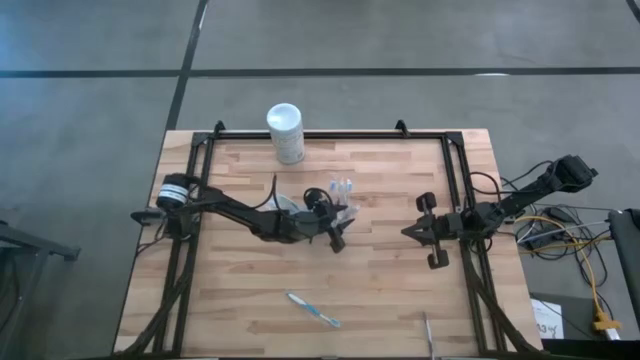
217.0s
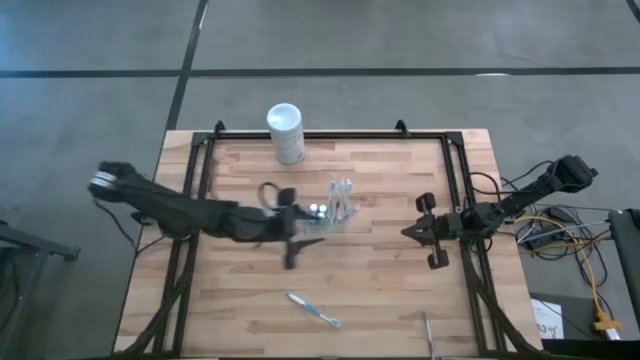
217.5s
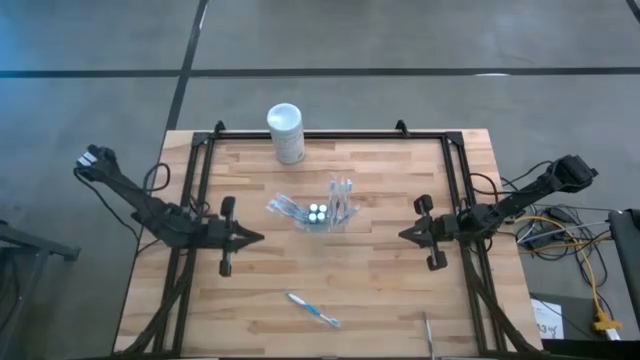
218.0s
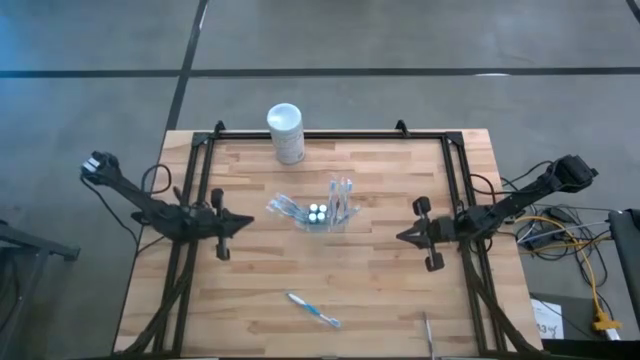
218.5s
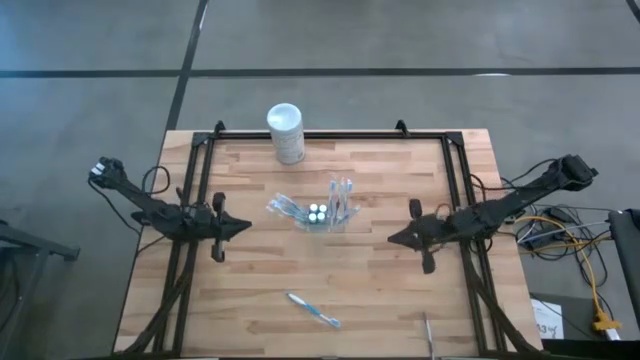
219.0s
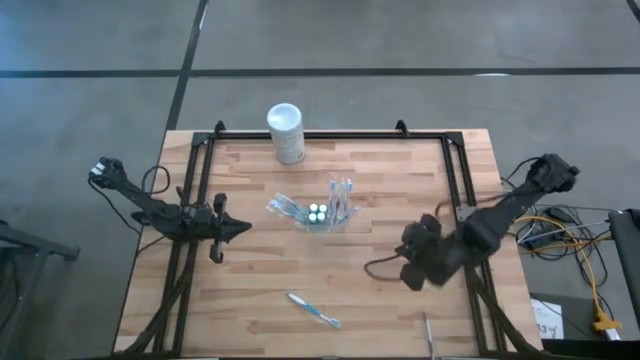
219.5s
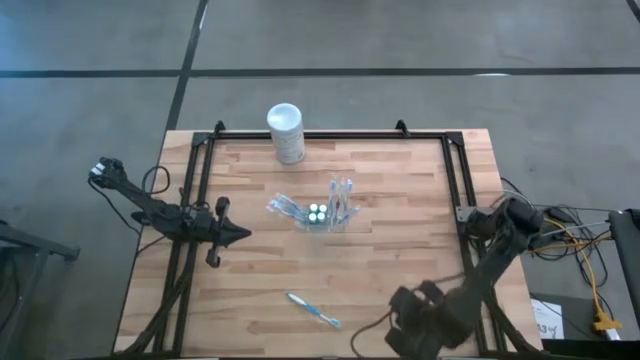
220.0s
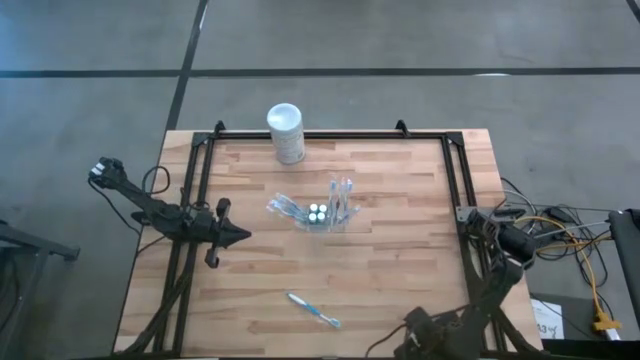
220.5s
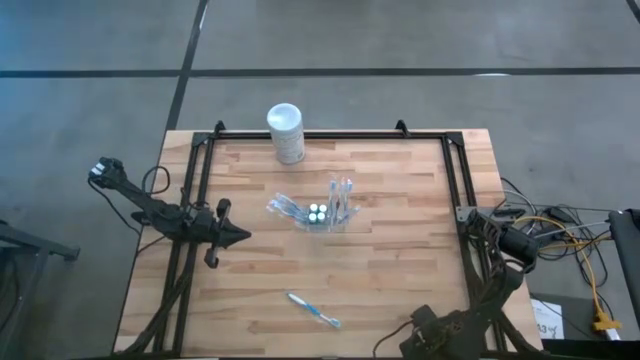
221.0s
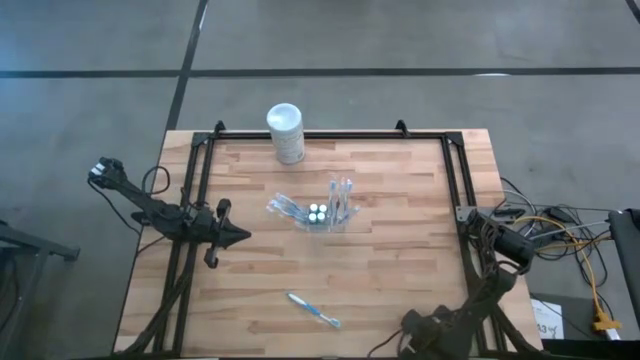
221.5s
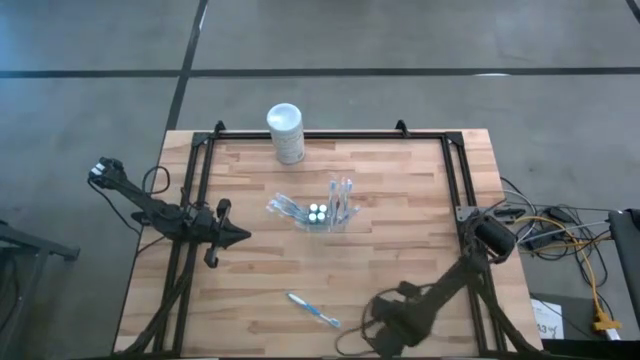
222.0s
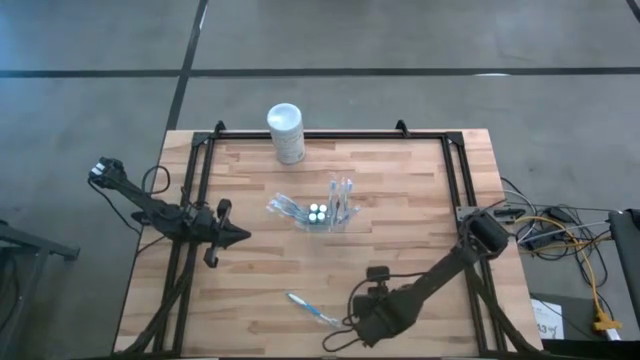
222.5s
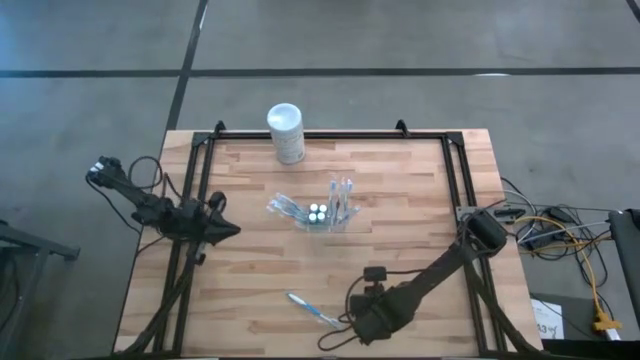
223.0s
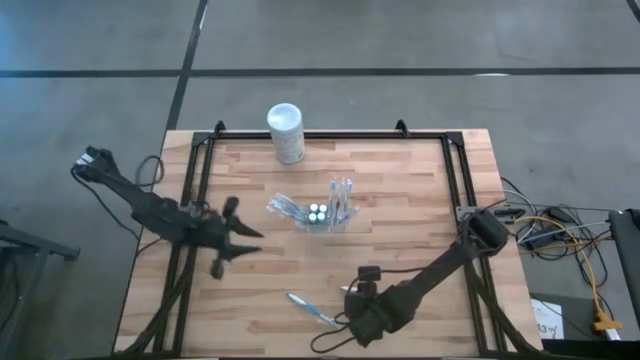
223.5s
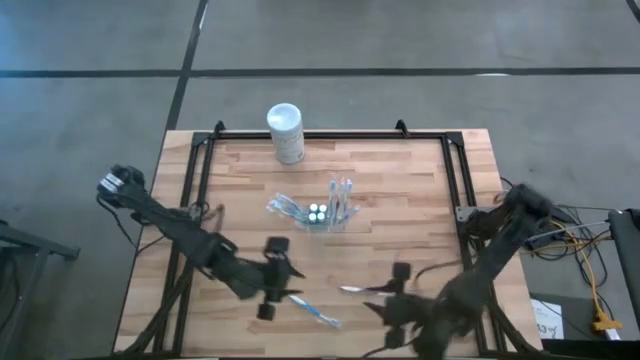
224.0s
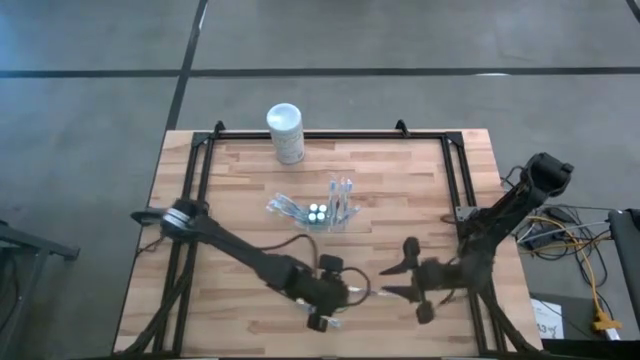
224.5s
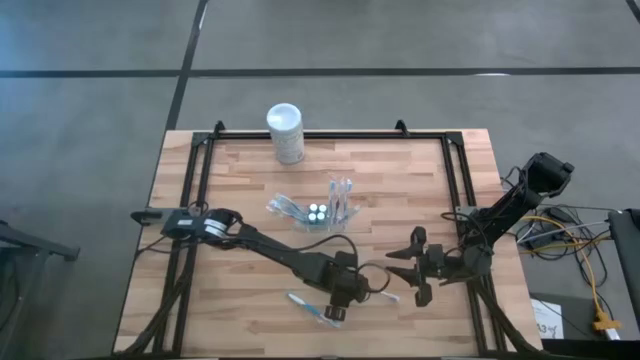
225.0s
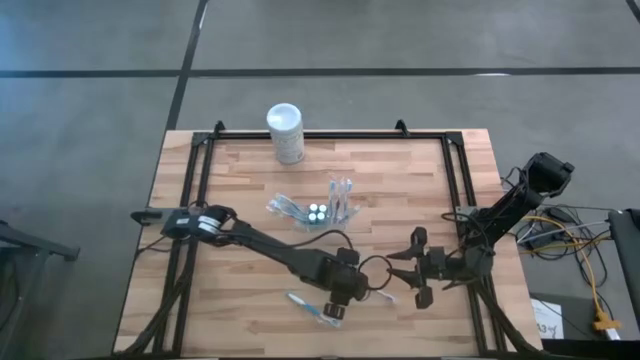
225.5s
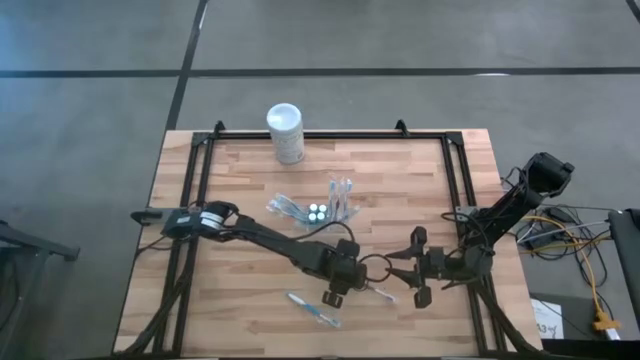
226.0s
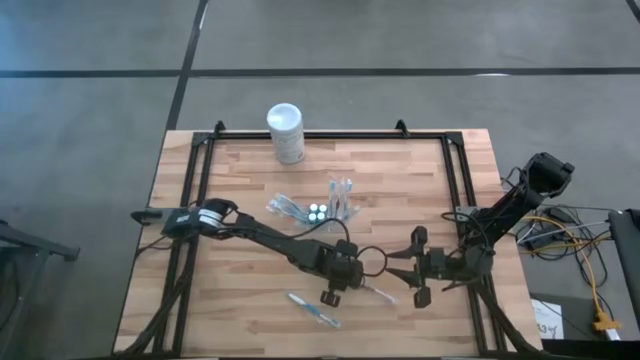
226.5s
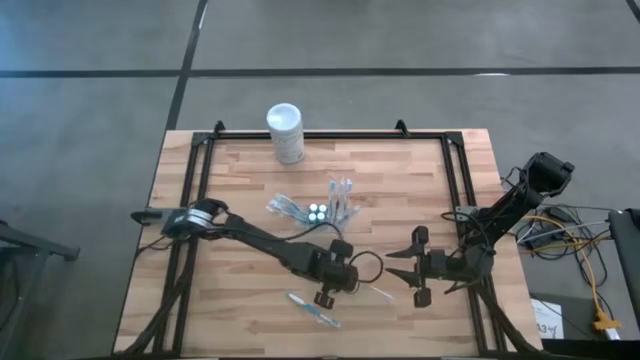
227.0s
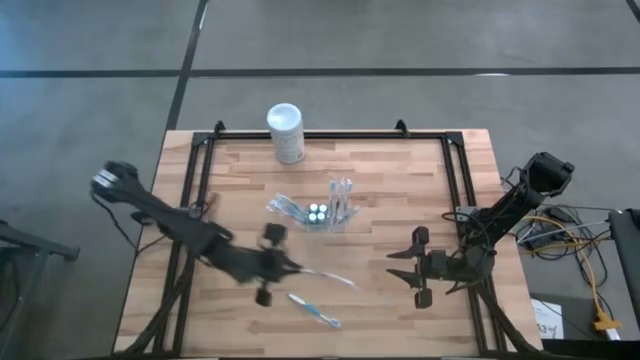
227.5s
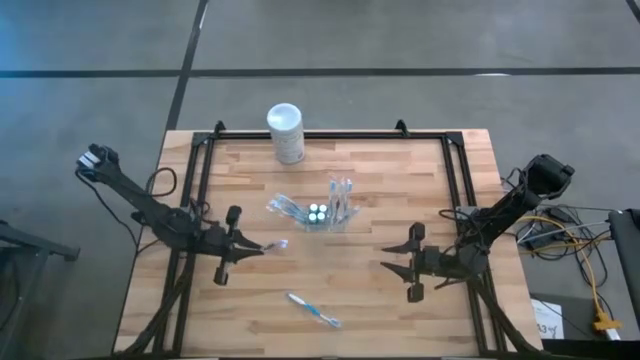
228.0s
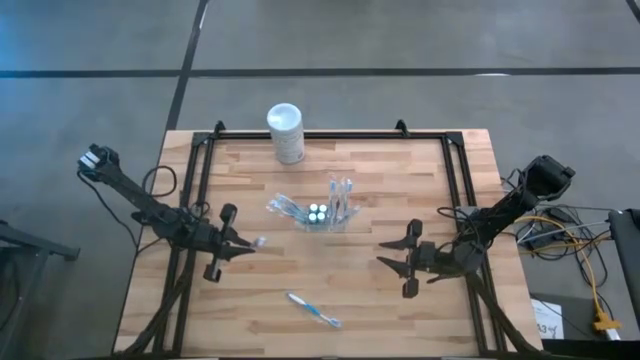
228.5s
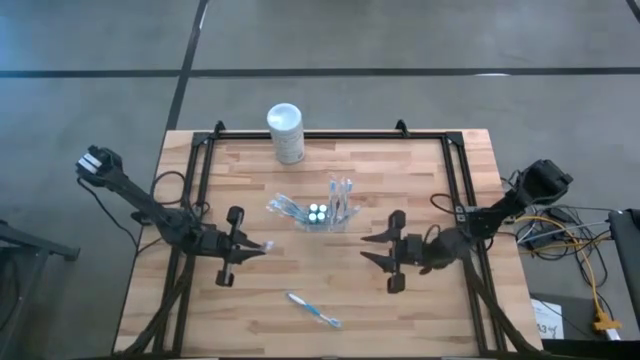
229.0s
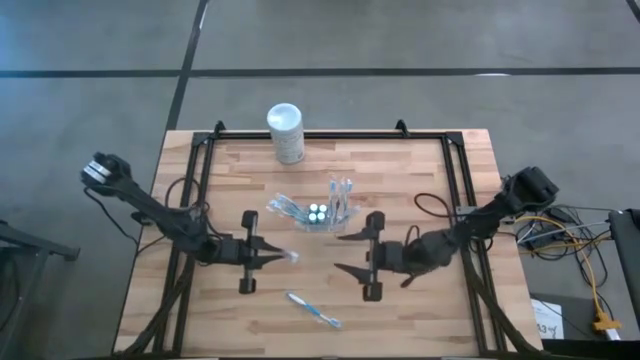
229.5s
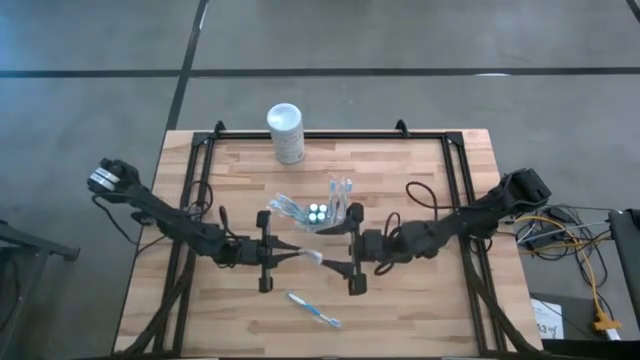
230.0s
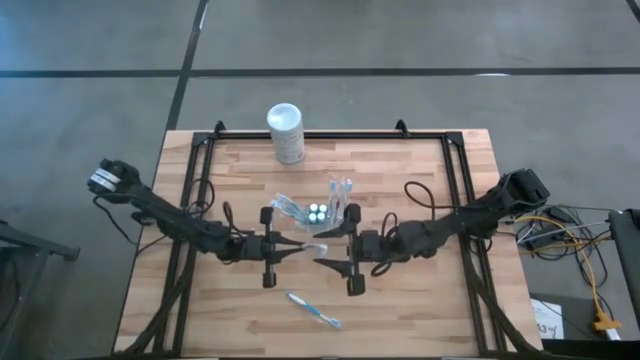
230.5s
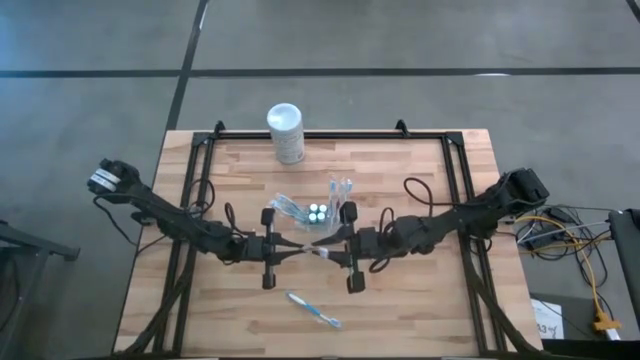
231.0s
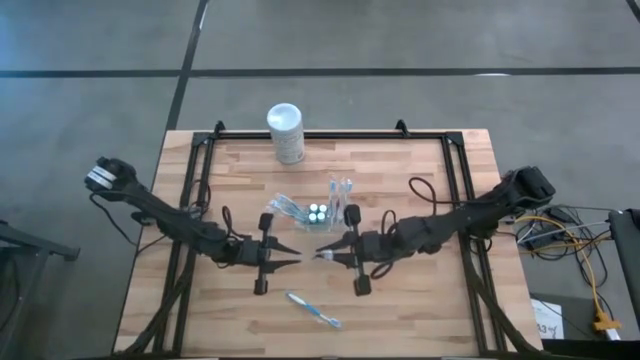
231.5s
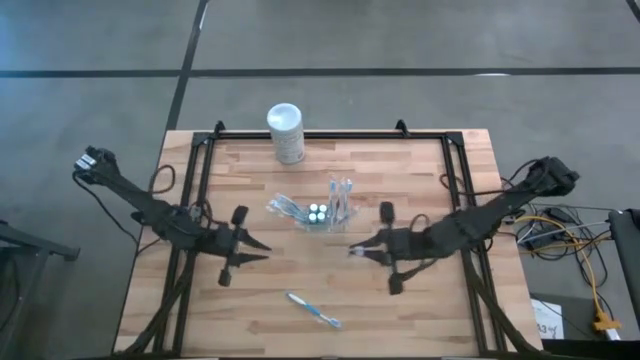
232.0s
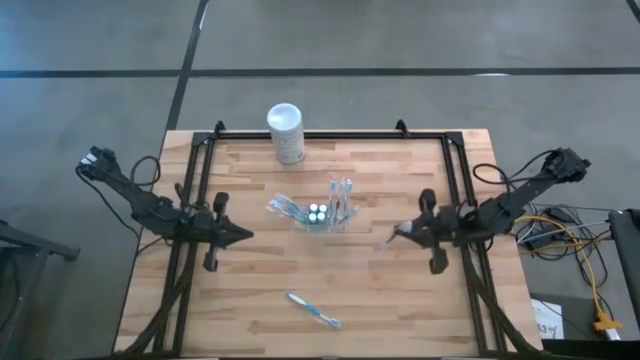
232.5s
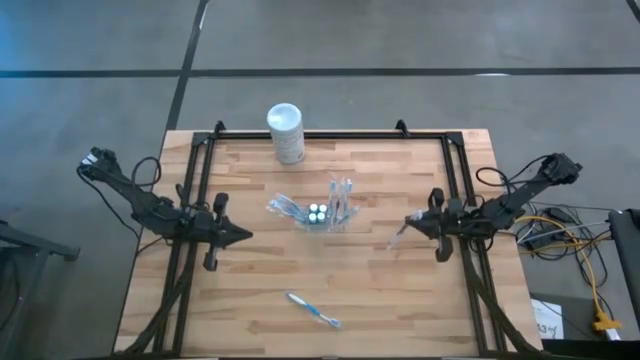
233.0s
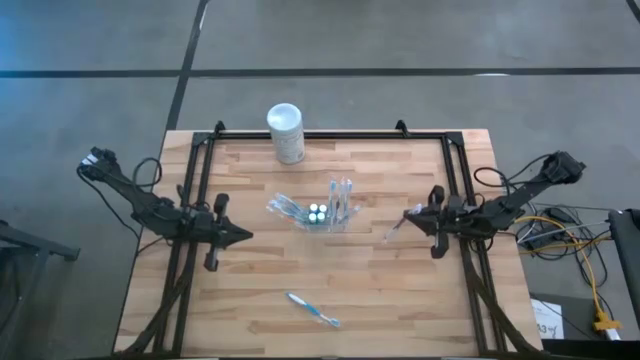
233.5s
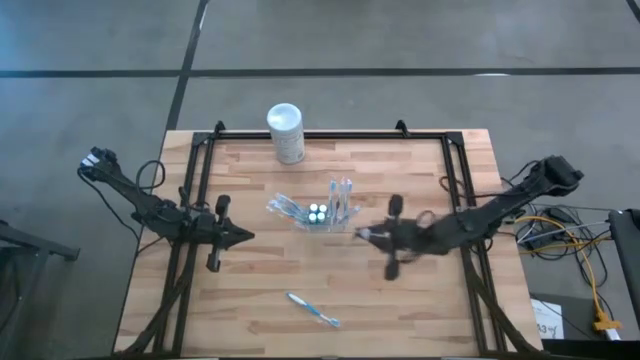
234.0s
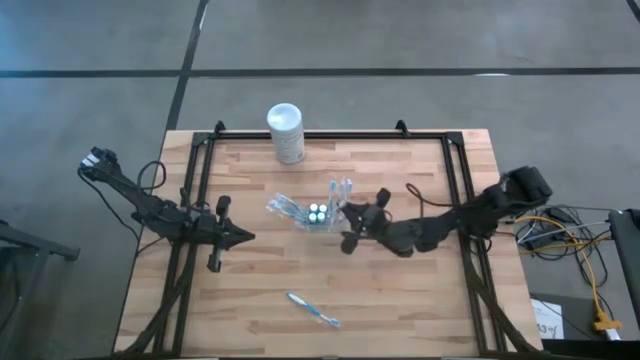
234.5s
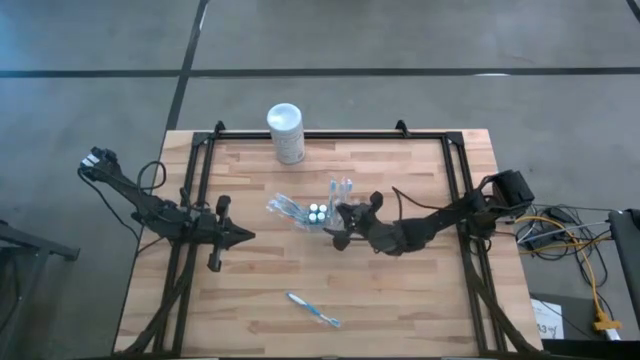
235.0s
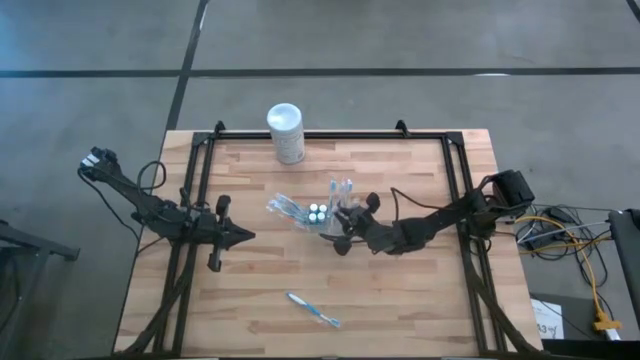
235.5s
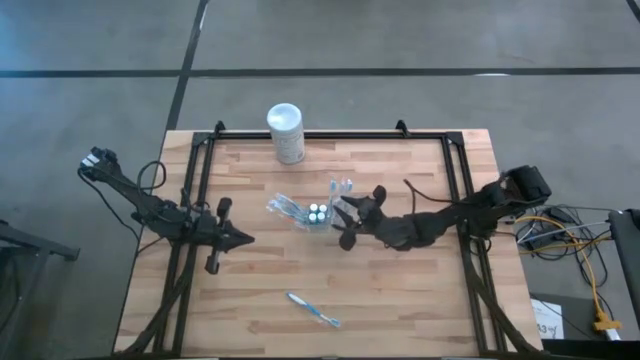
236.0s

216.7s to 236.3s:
Task: Pick & Place toothbrushing station
Put the purple toothbrush into the transparent organizer

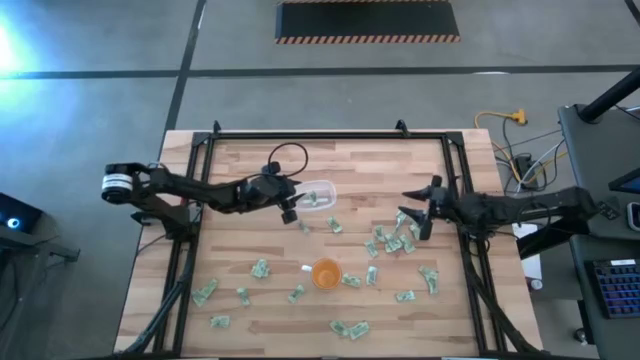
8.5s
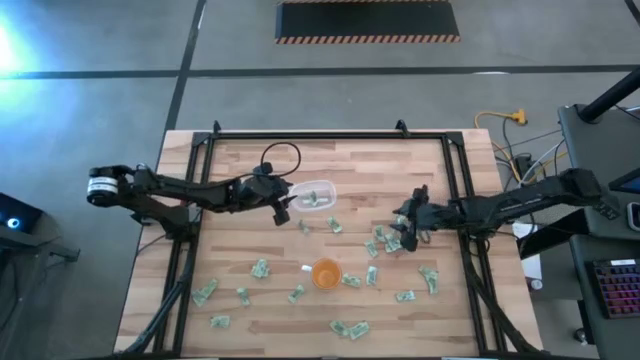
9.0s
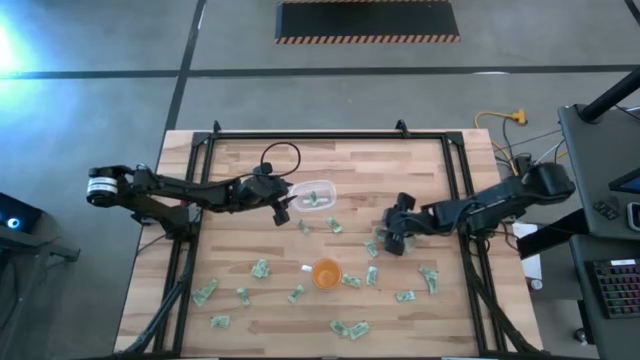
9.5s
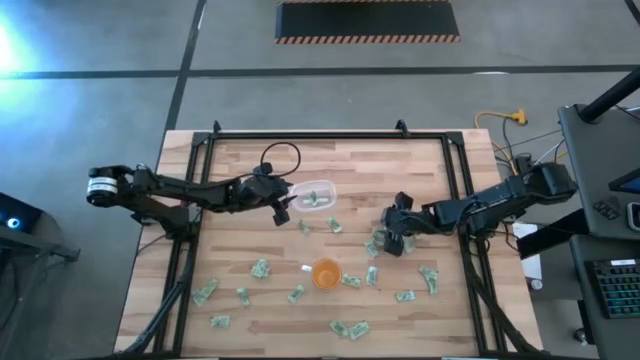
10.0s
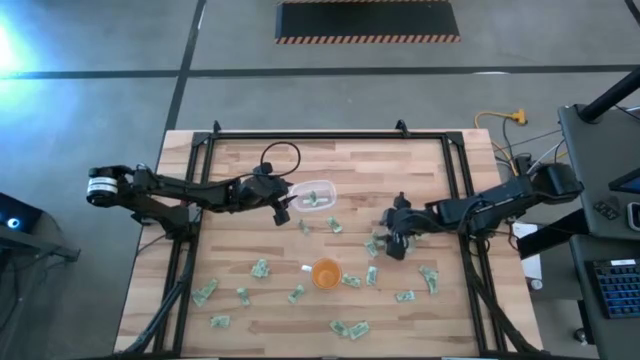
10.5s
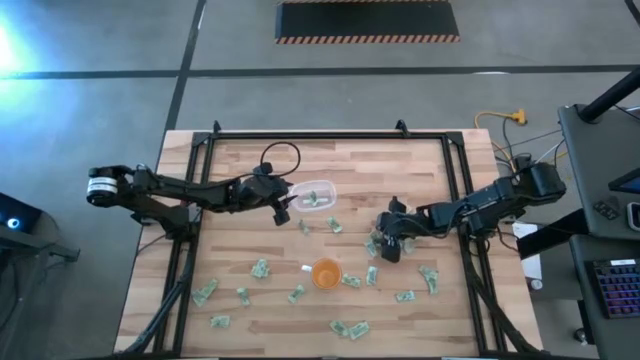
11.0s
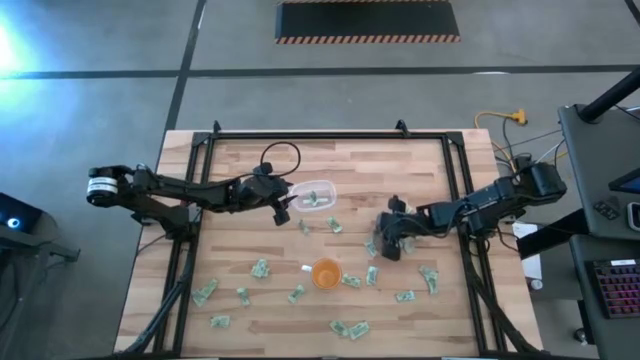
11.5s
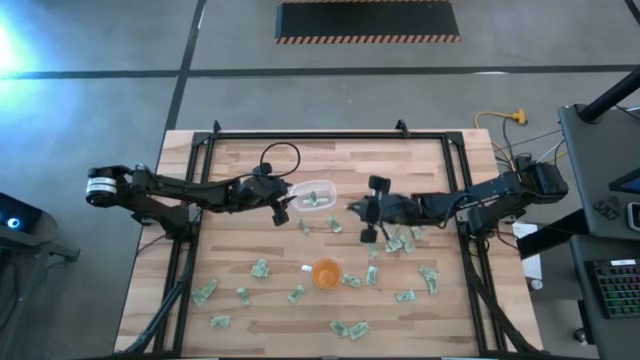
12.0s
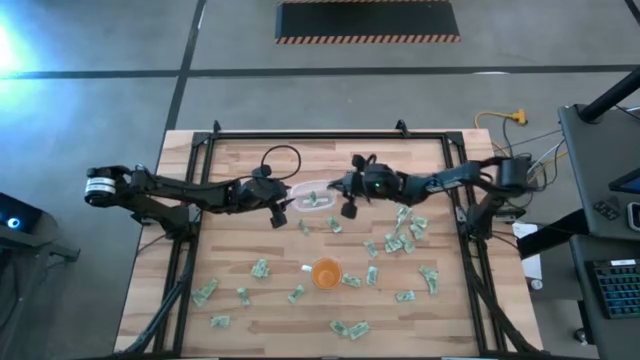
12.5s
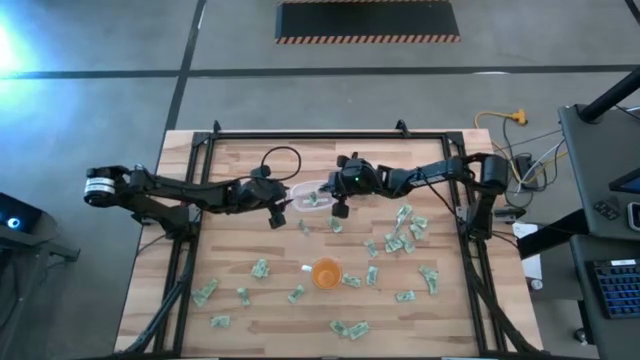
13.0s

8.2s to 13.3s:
Task: Pick and place Stevia / Truvia into bins
Put the stevia packet into the transparent bin
